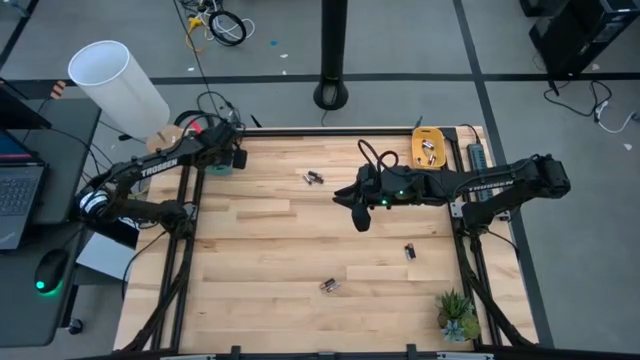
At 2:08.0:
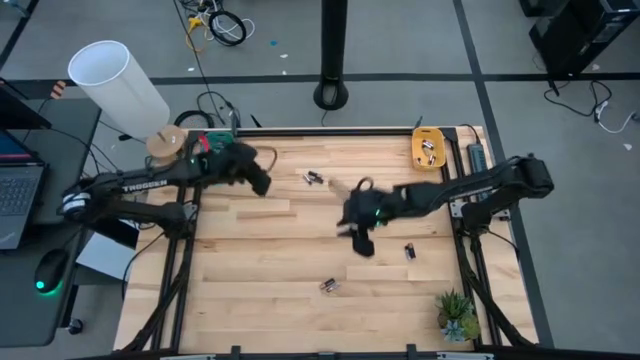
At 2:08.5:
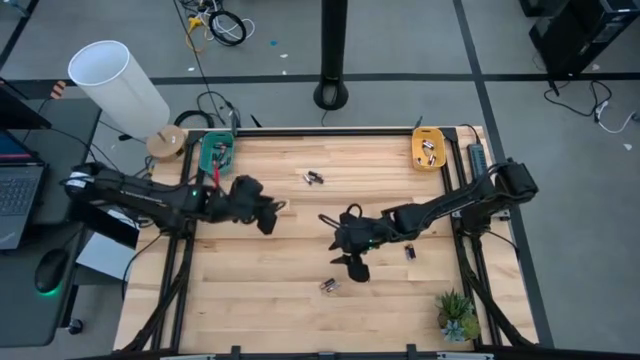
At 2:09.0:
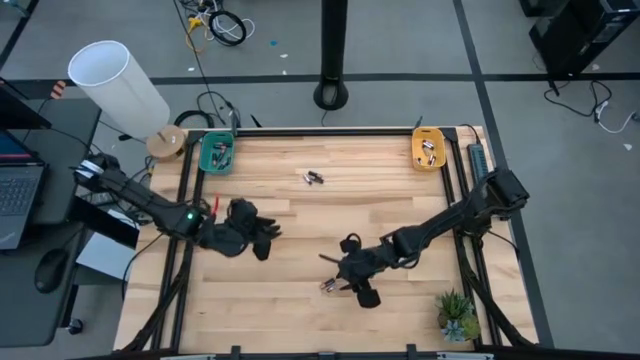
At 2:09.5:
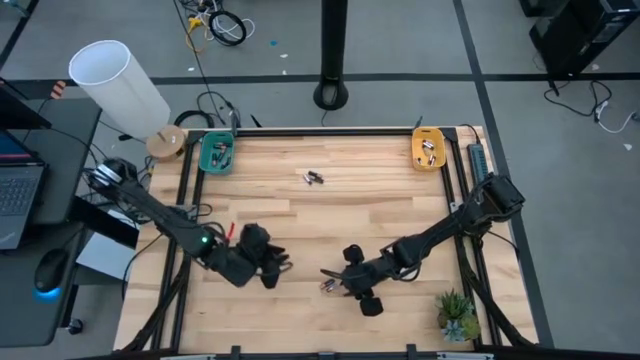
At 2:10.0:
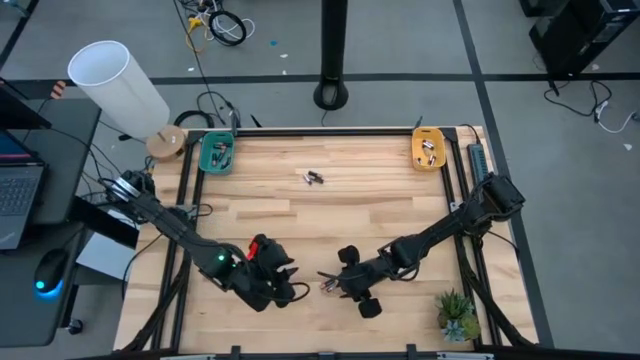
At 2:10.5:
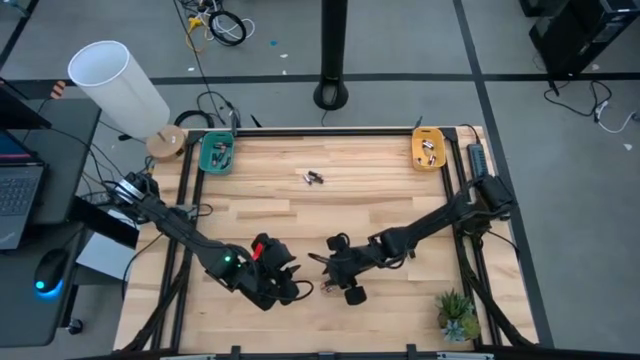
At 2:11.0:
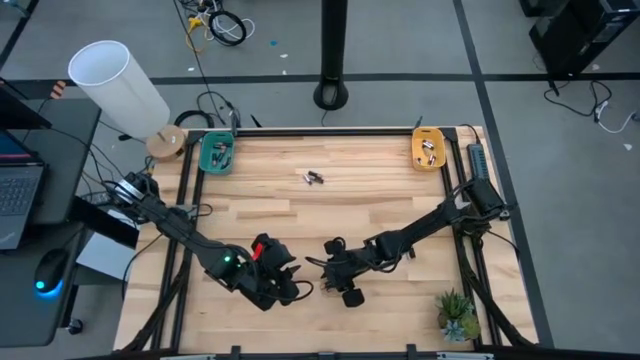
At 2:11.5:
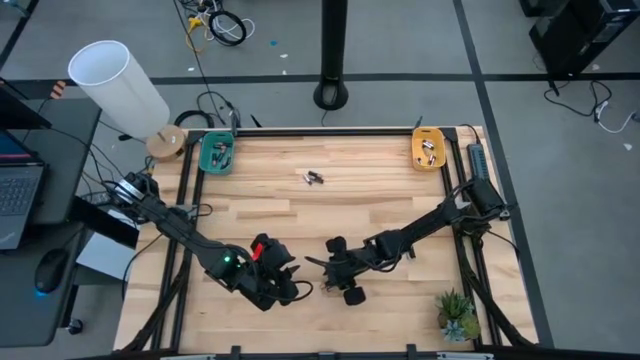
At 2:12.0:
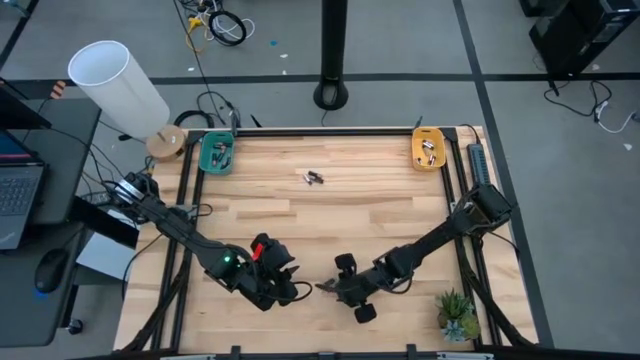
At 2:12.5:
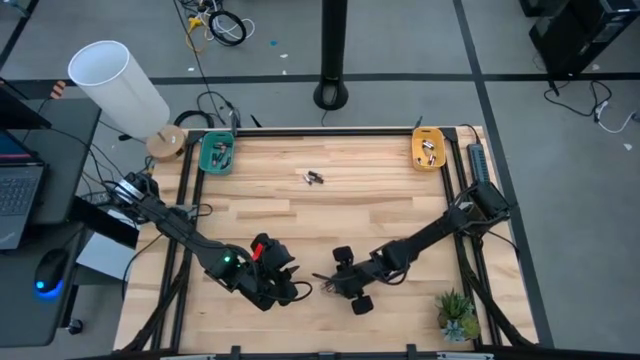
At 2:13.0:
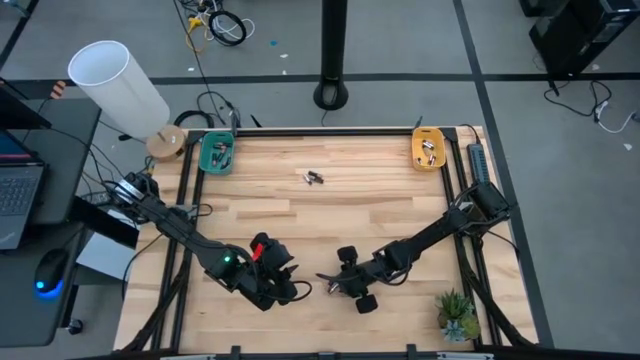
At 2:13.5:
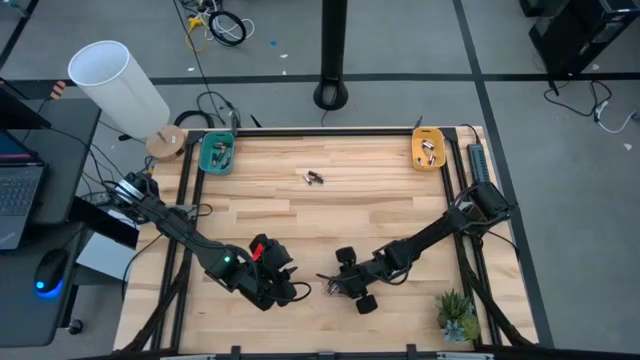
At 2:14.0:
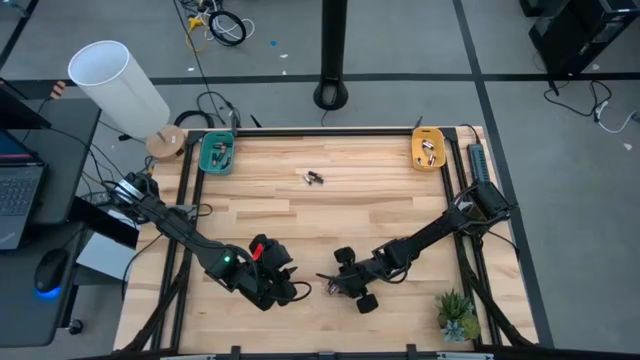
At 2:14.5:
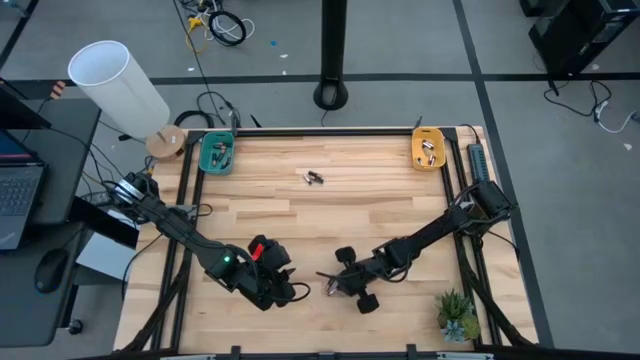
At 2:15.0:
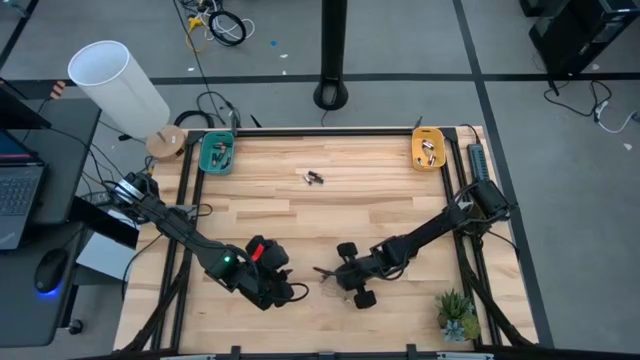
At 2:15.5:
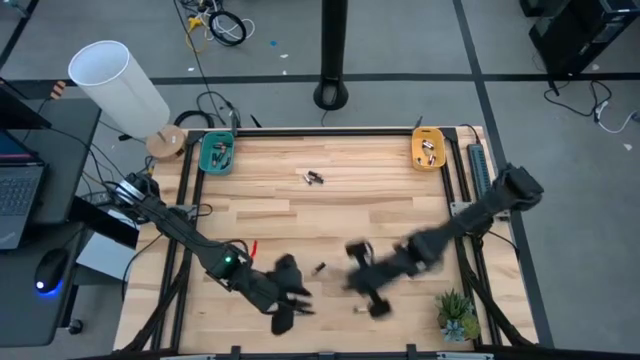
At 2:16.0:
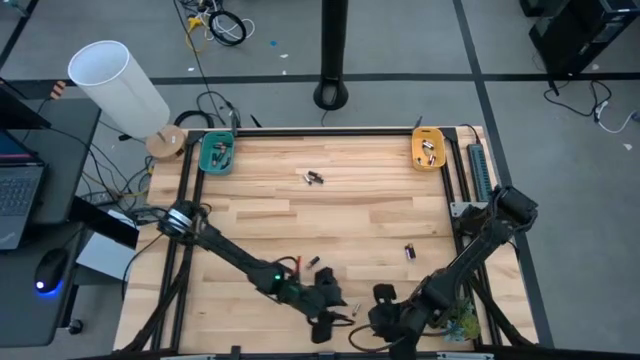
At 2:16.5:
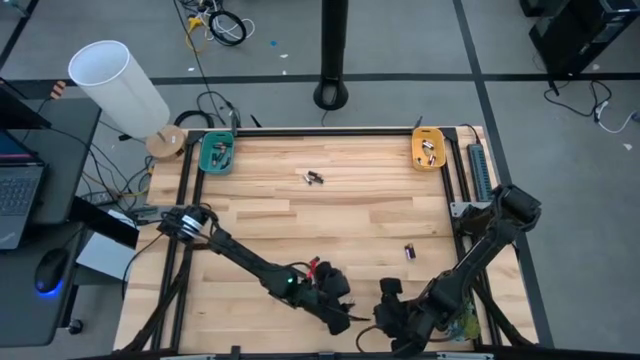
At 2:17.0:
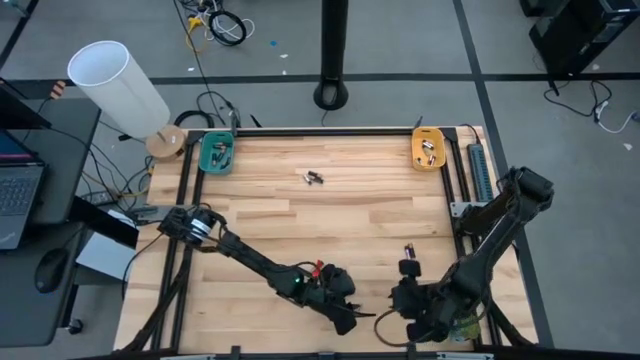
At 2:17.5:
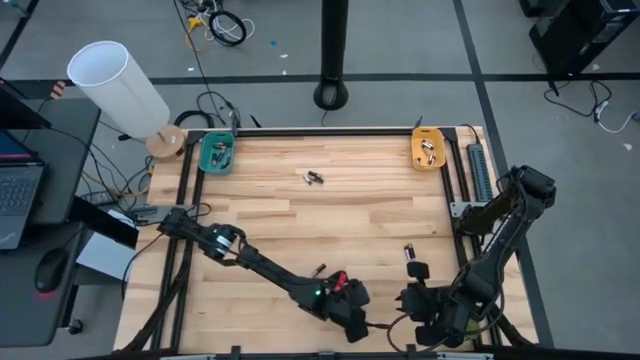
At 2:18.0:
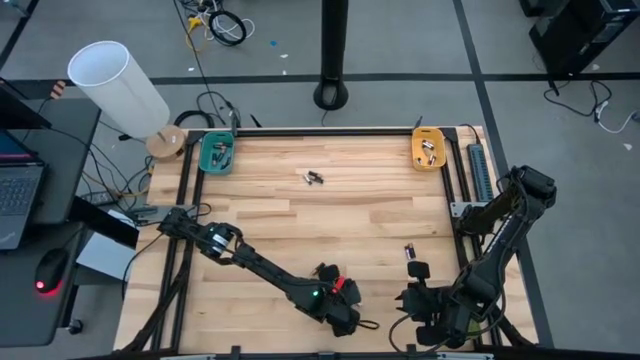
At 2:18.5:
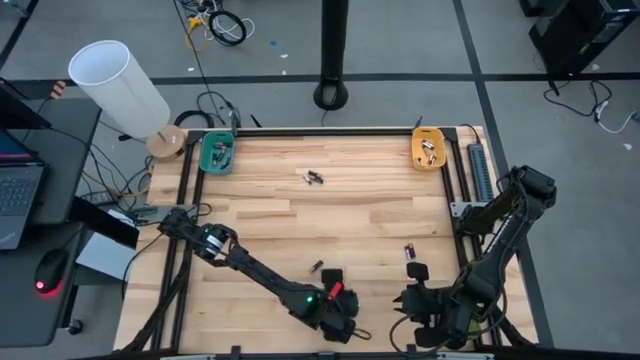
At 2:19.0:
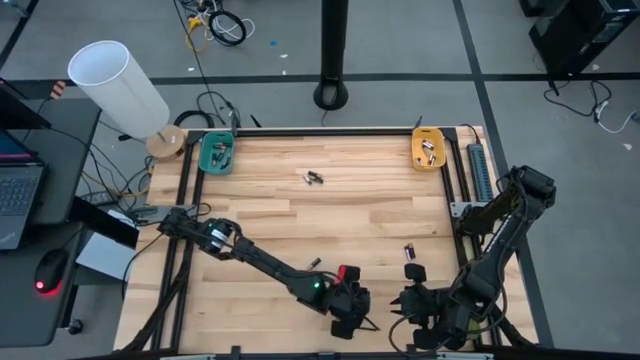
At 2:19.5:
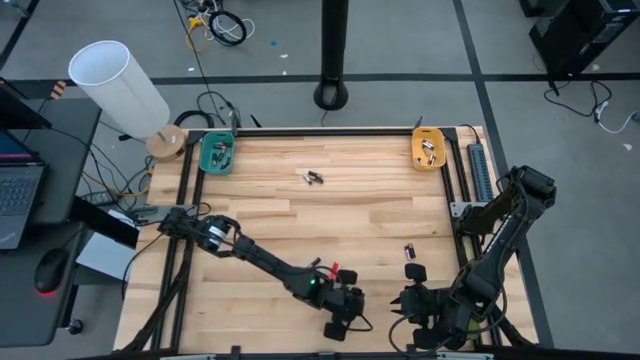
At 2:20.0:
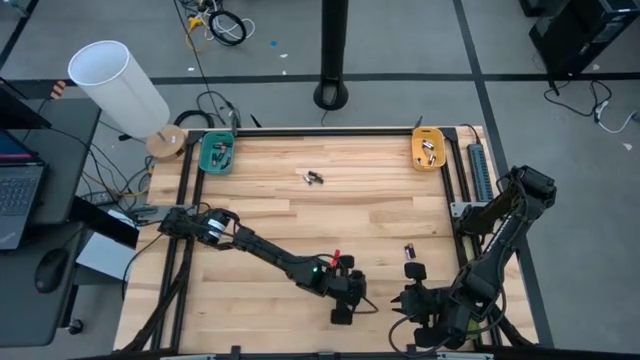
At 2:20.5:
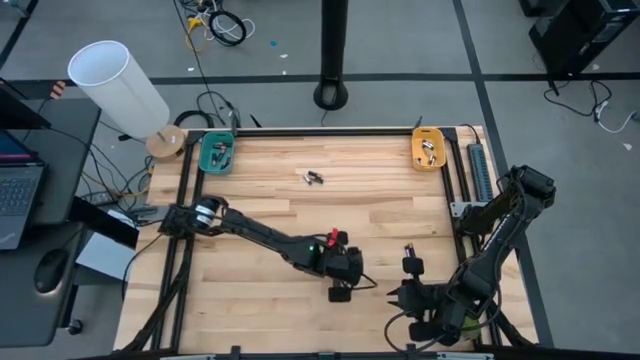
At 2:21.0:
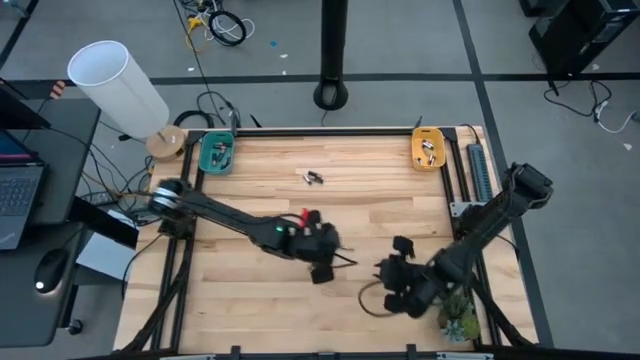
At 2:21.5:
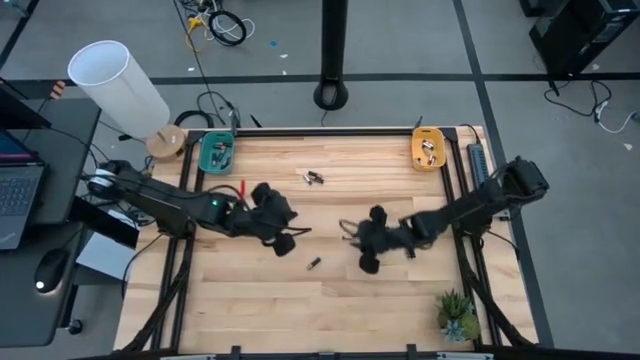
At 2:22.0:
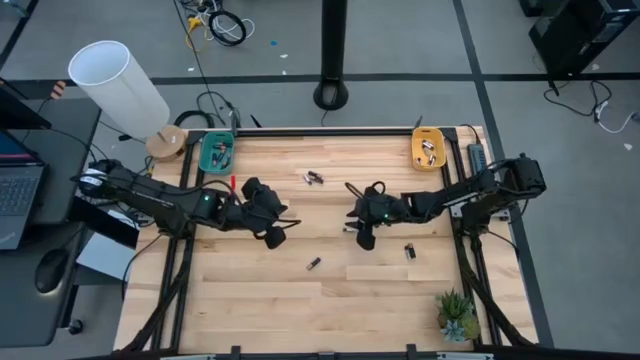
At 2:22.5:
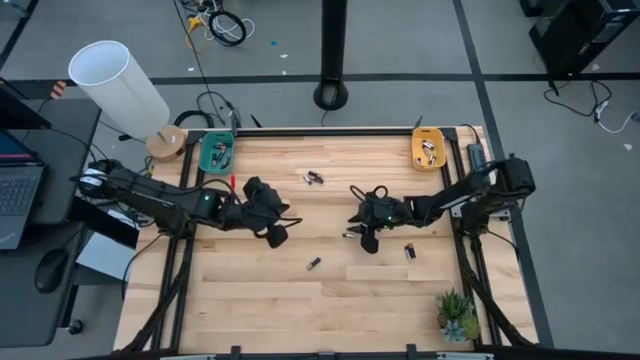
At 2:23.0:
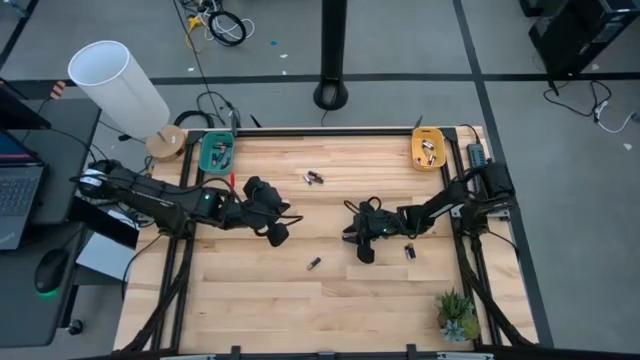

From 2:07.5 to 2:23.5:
Task: Sort batteries
Put the silver battery into the yellow bin

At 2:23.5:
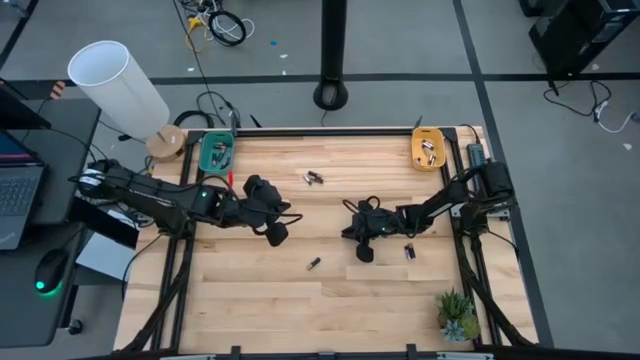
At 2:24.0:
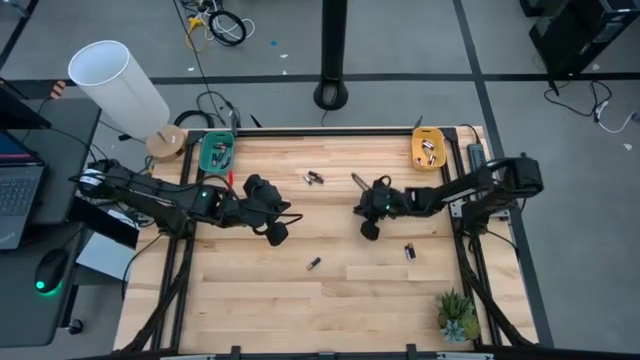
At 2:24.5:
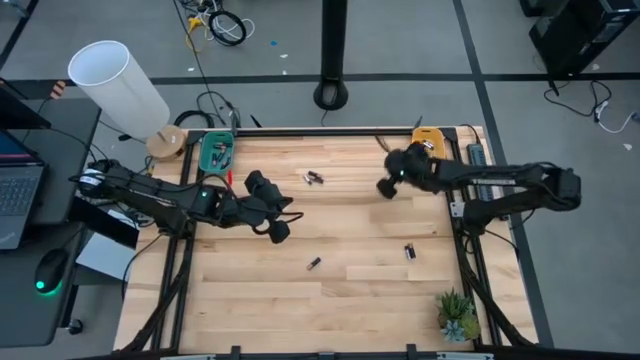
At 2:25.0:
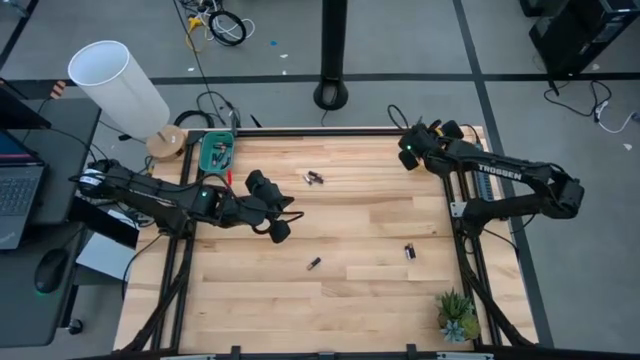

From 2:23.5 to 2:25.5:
Put the silver battery into the yellow bin

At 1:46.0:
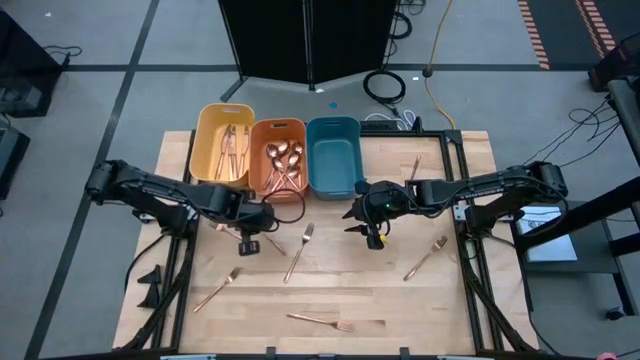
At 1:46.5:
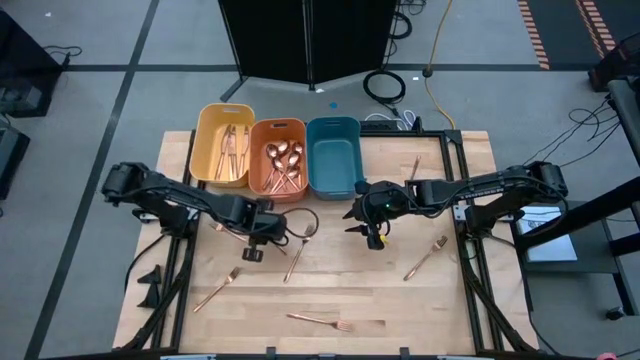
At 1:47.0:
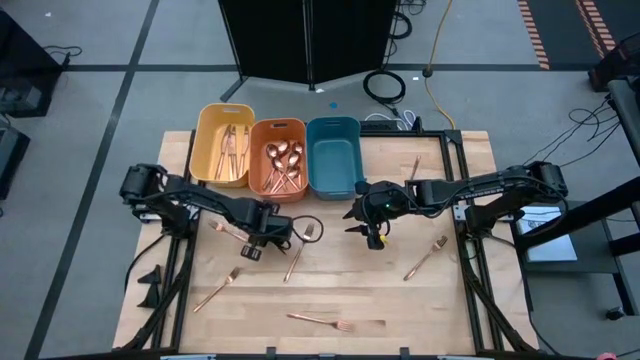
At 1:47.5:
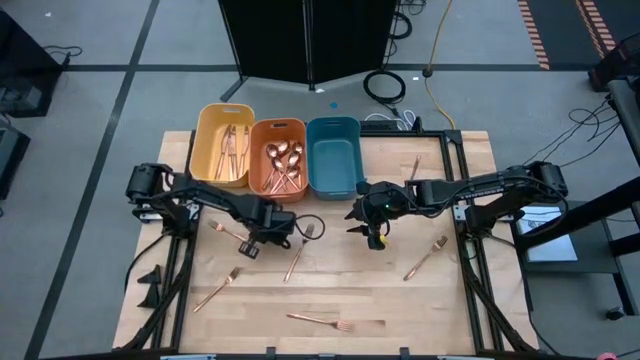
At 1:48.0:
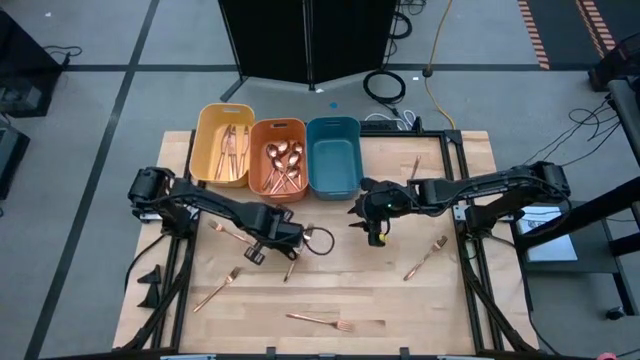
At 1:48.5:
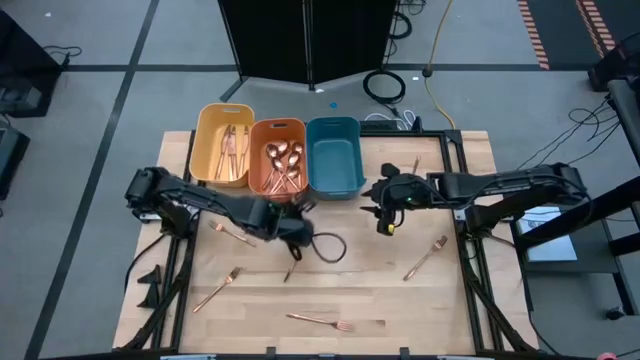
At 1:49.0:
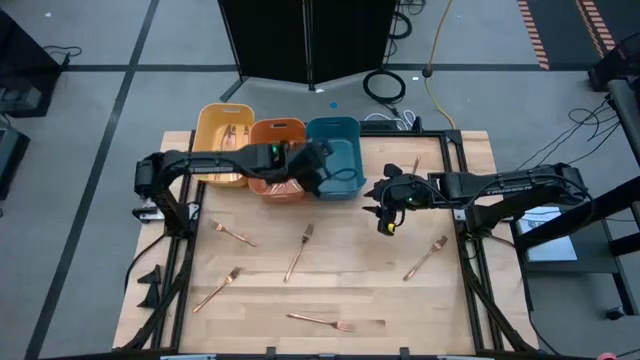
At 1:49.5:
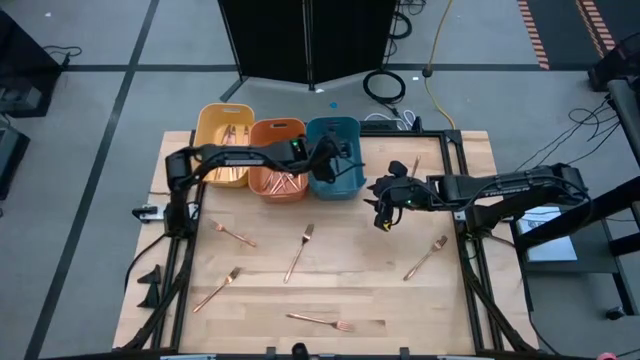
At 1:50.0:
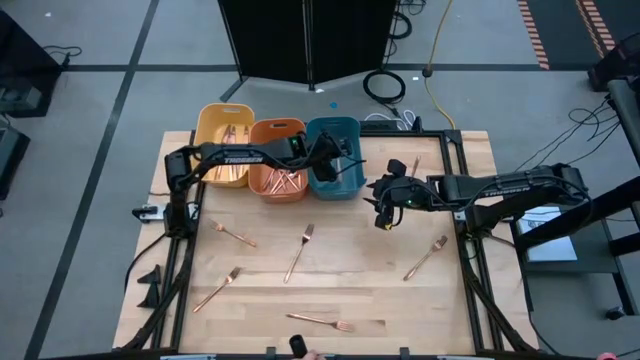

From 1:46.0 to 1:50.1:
Task: Sort silverware
Put the gold fork into the blue bin
